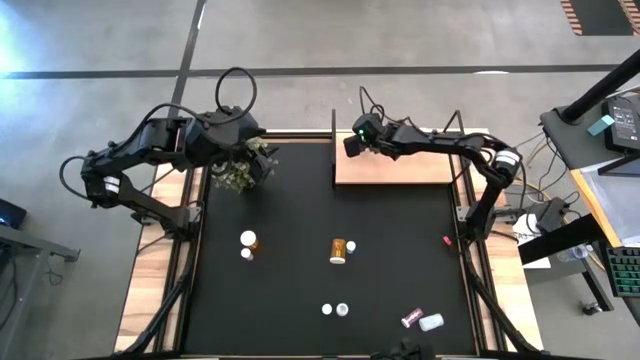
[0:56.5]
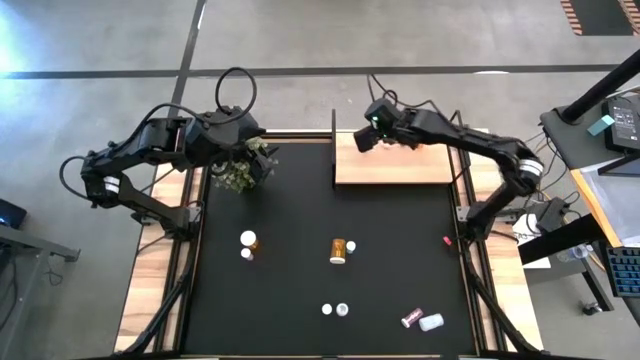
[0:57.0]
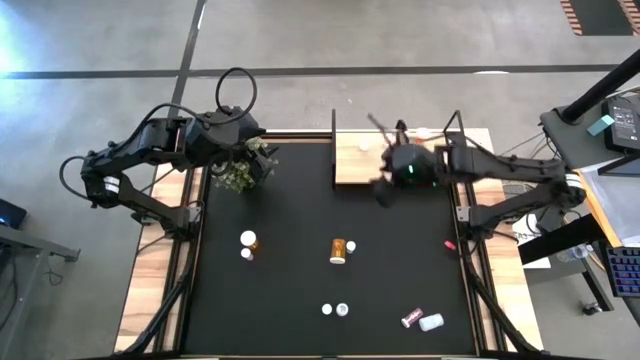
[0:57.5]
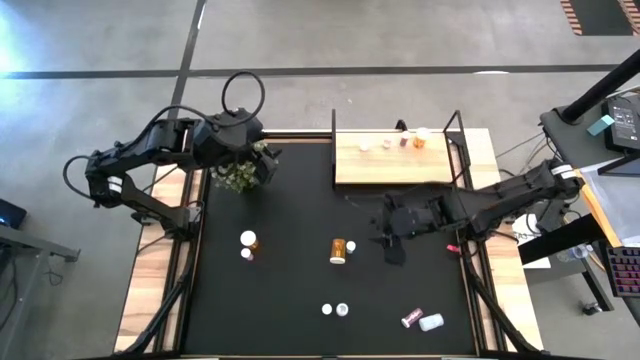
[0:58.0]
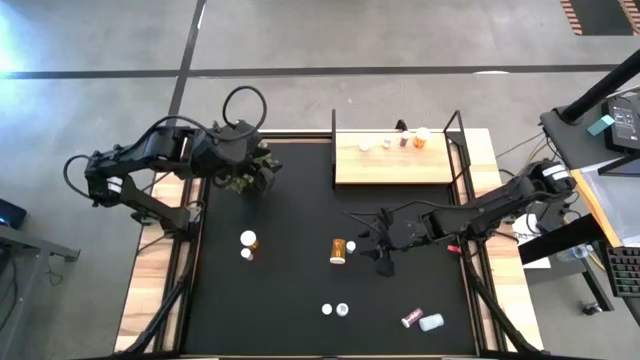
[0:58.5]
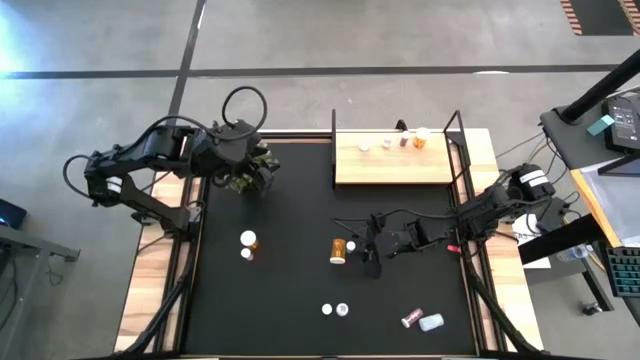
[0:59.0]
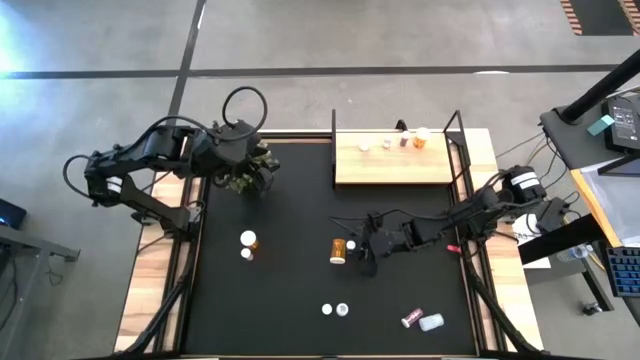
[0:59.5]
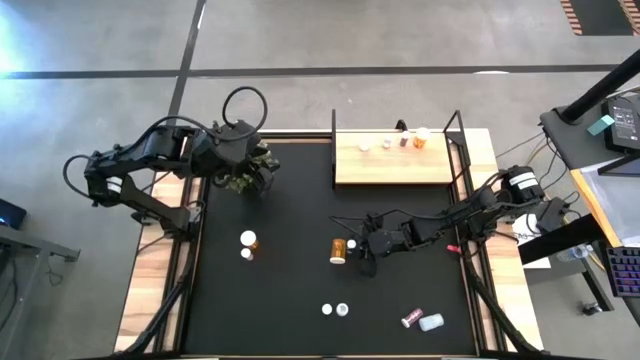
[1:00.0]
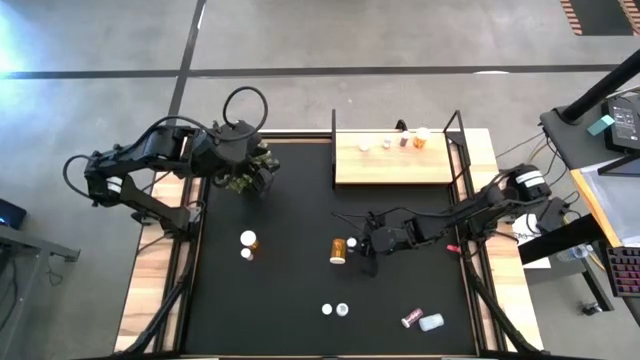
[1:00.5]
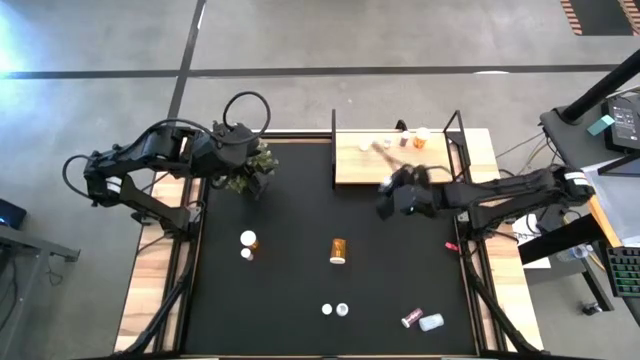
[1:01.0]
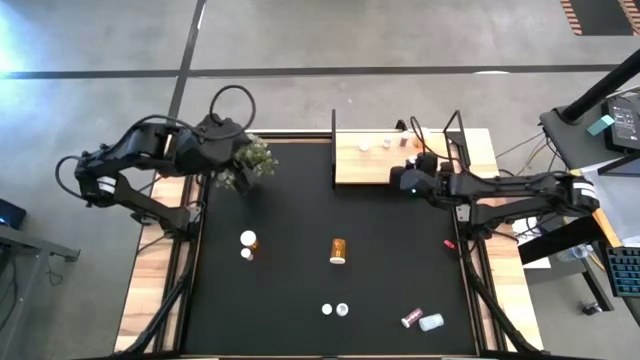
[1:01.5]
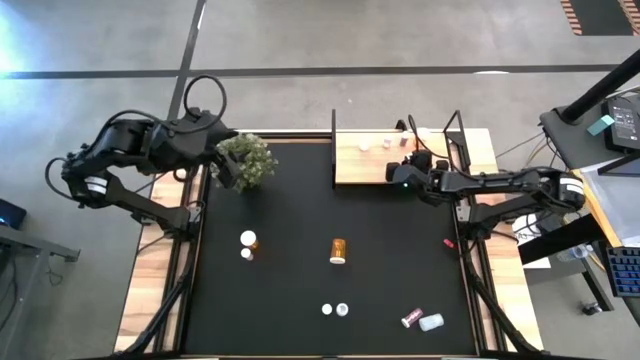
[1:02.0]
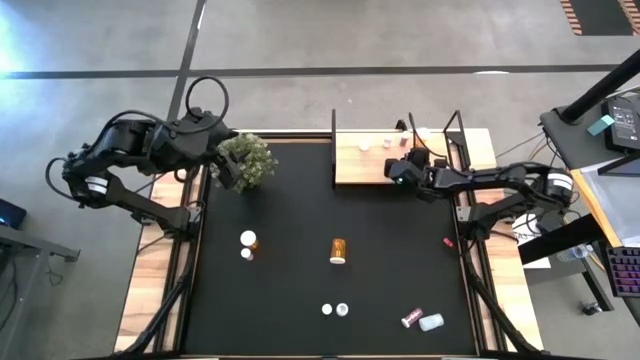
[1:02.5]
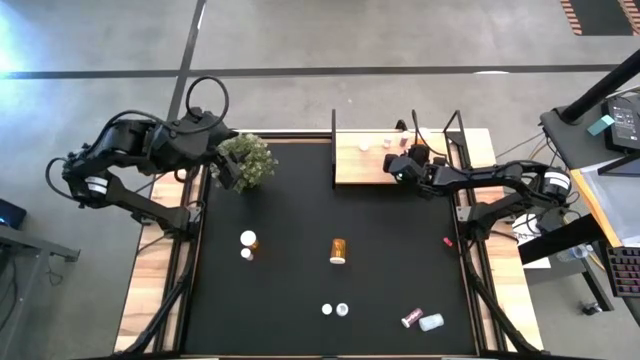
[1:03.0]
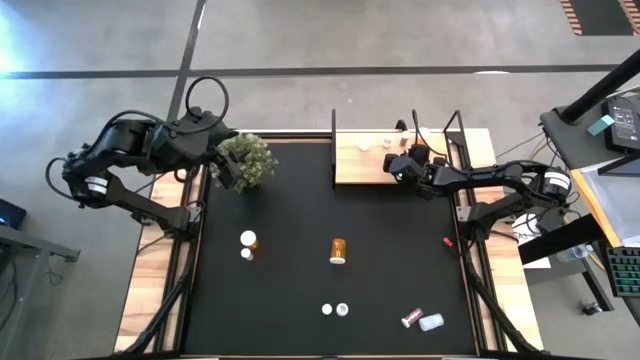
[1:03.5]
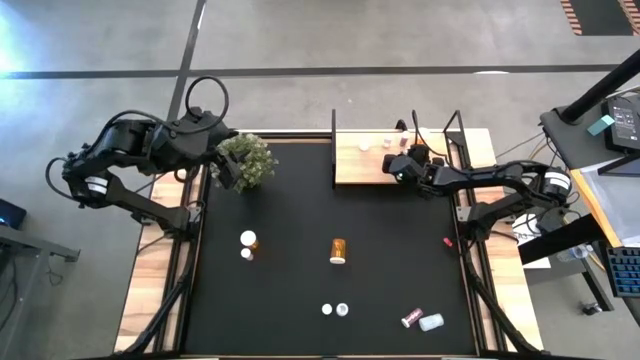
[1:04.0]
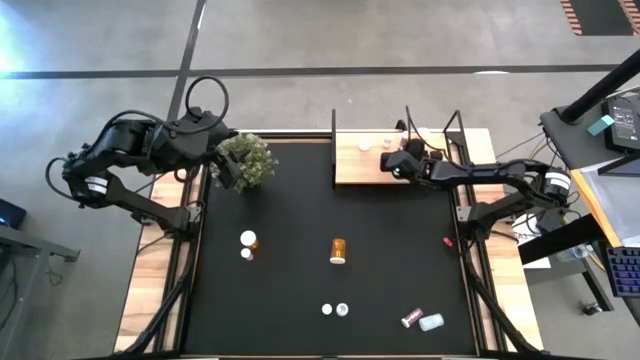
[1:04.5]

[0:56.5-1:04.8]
Task: Pick and place medicine bottles onto shelf by color
Put the top blue pill bottle on the shelf aligned with the other blue pill bottle
